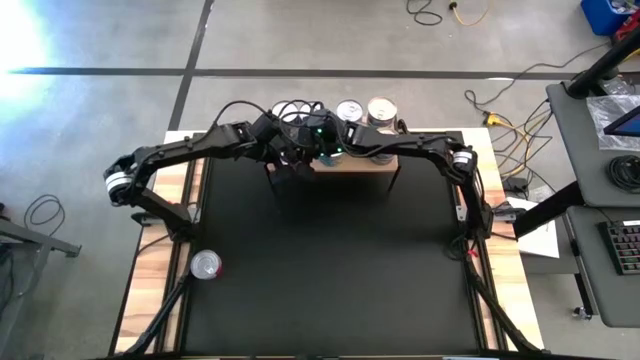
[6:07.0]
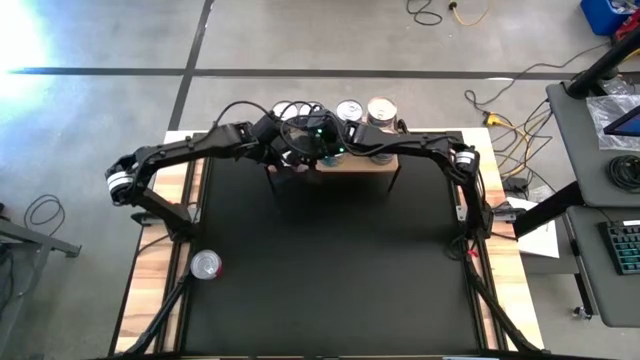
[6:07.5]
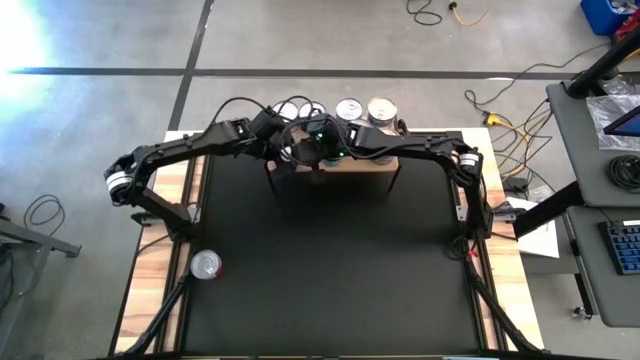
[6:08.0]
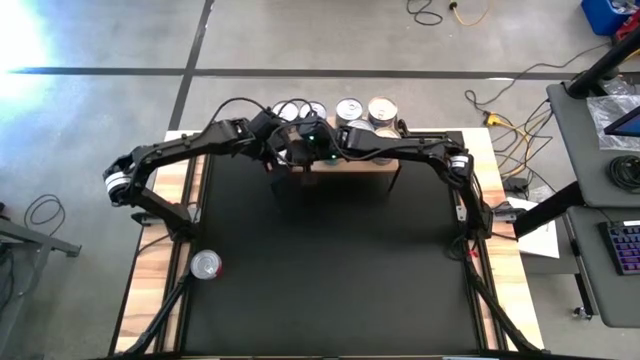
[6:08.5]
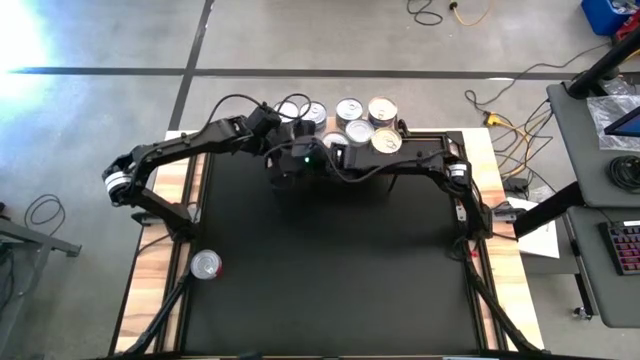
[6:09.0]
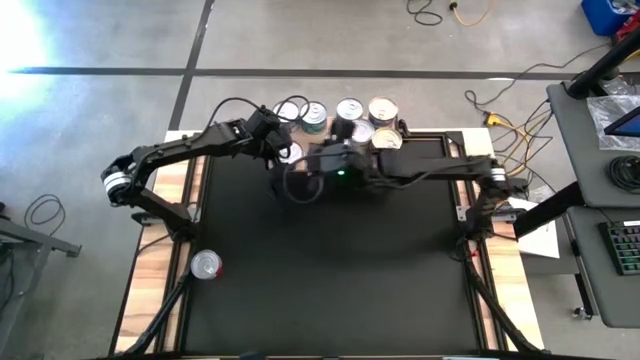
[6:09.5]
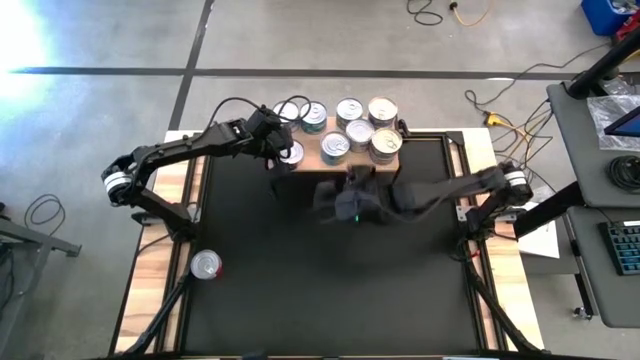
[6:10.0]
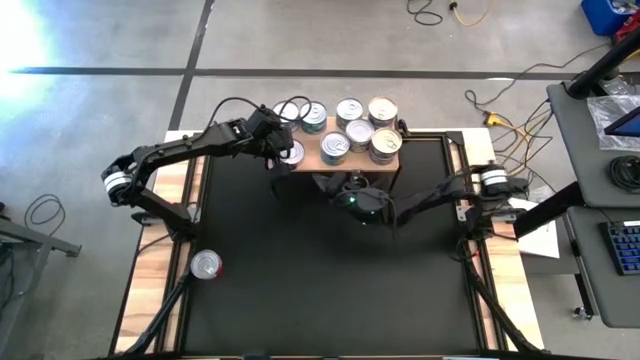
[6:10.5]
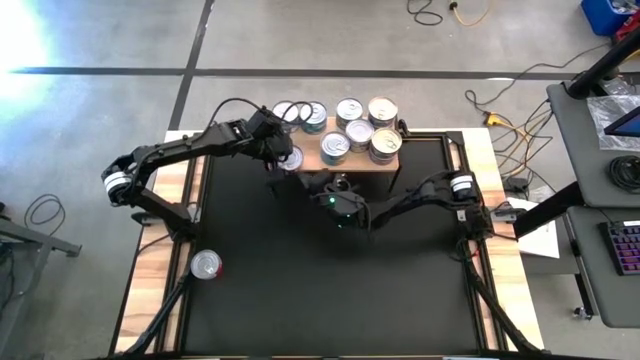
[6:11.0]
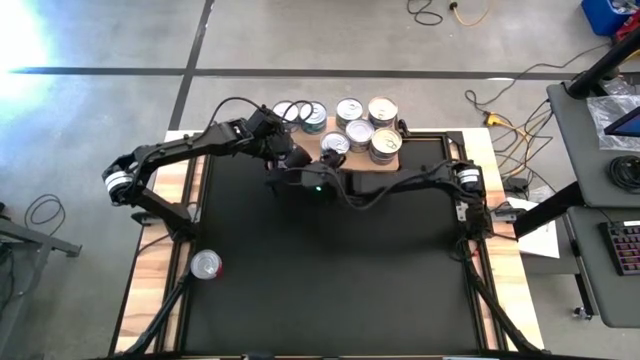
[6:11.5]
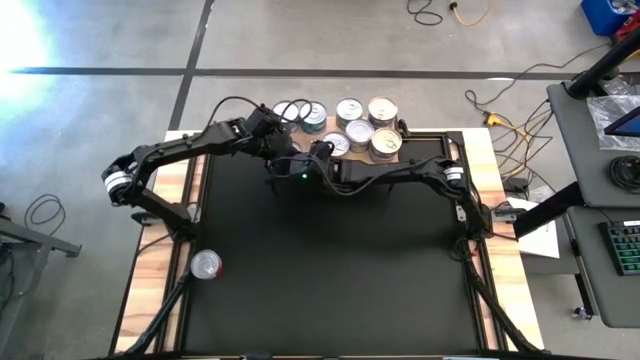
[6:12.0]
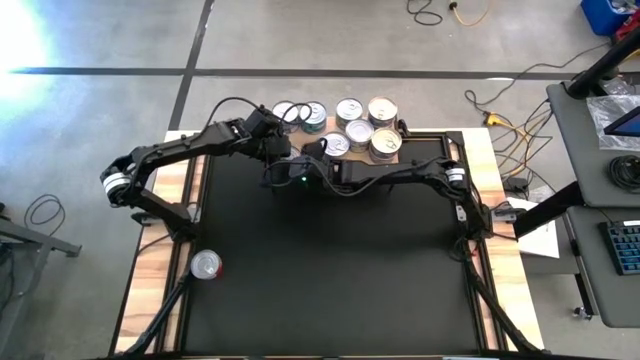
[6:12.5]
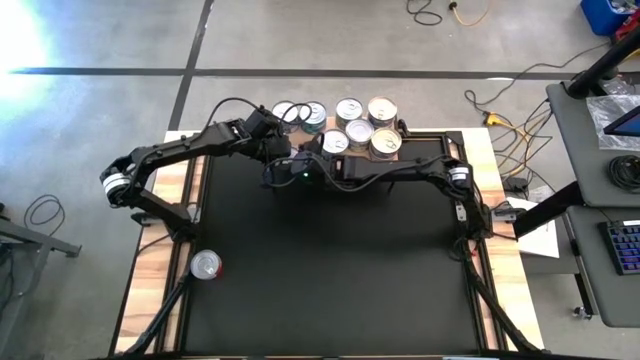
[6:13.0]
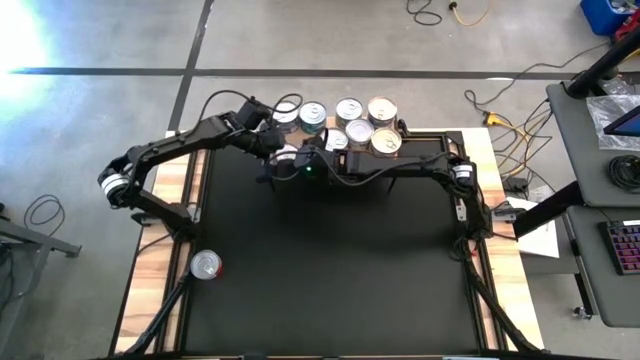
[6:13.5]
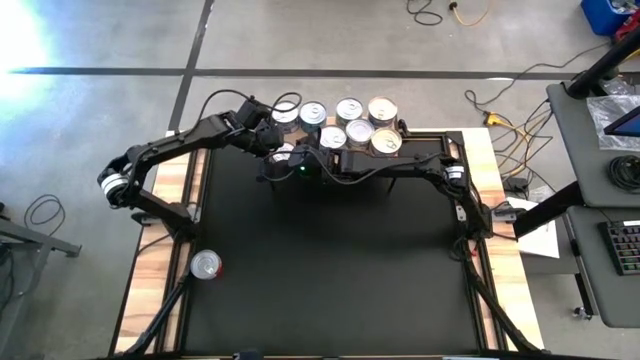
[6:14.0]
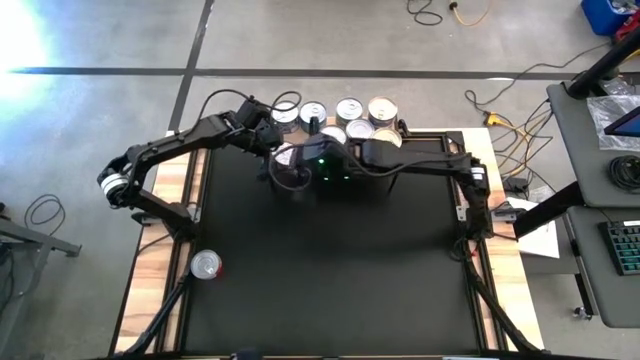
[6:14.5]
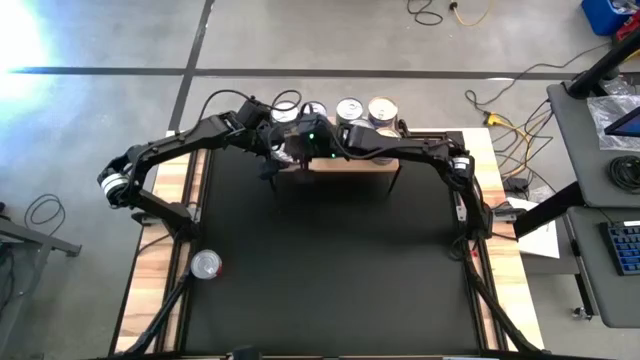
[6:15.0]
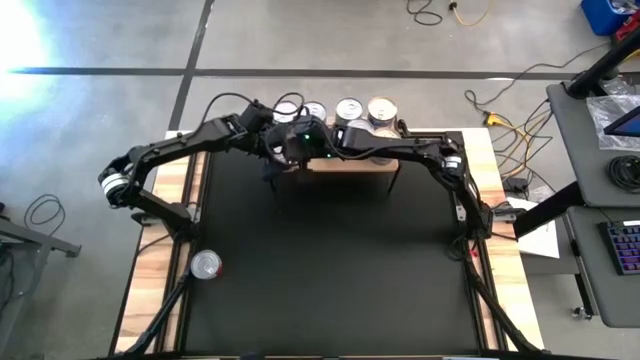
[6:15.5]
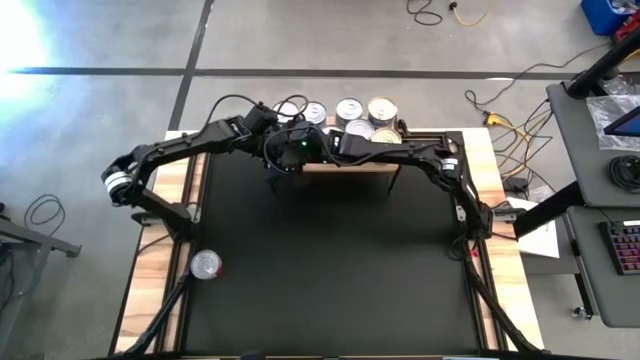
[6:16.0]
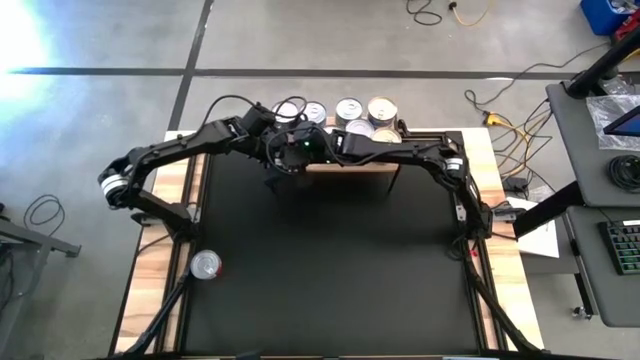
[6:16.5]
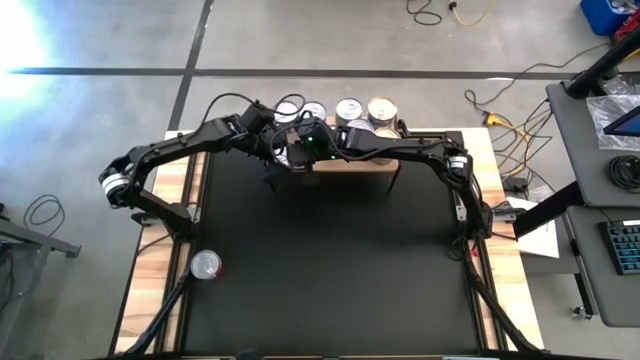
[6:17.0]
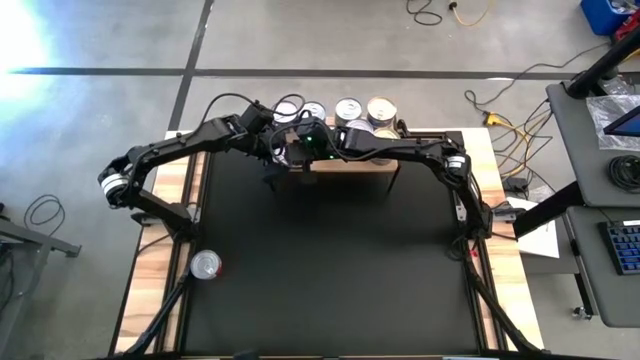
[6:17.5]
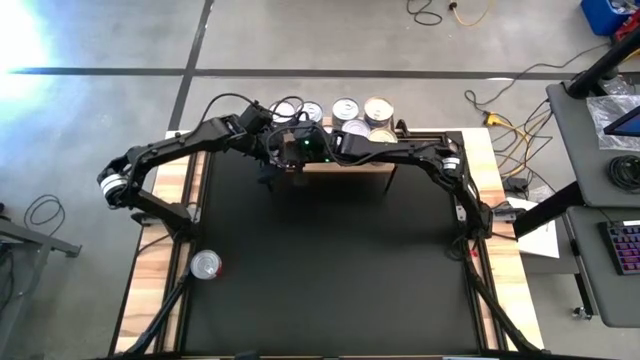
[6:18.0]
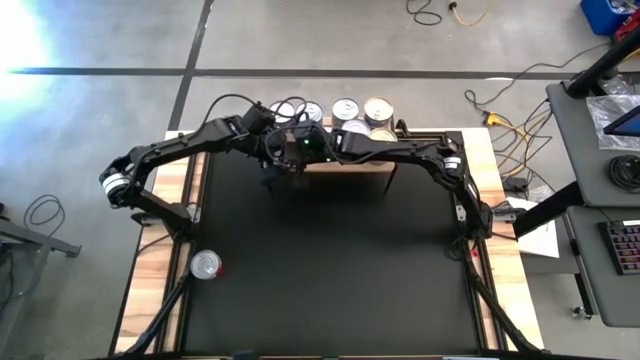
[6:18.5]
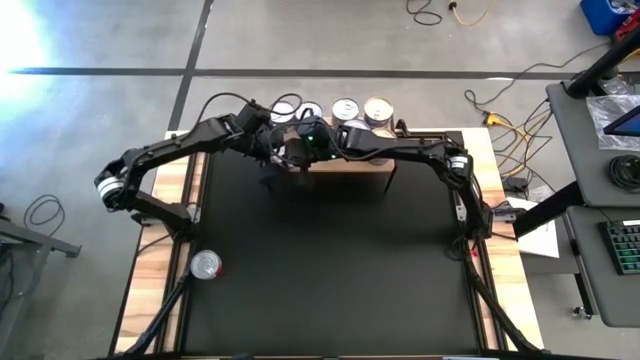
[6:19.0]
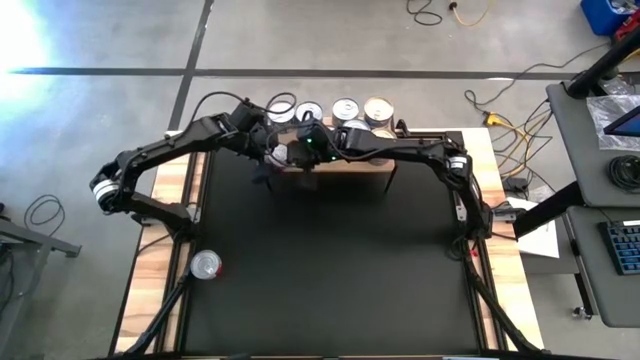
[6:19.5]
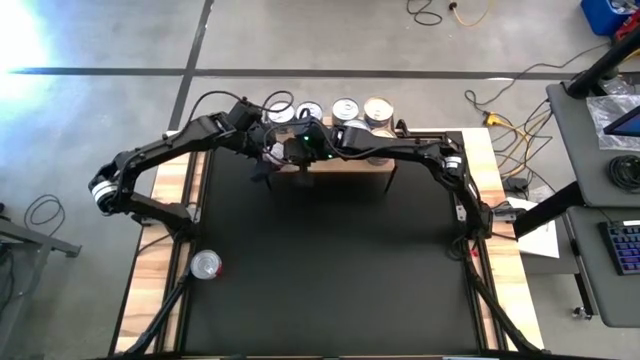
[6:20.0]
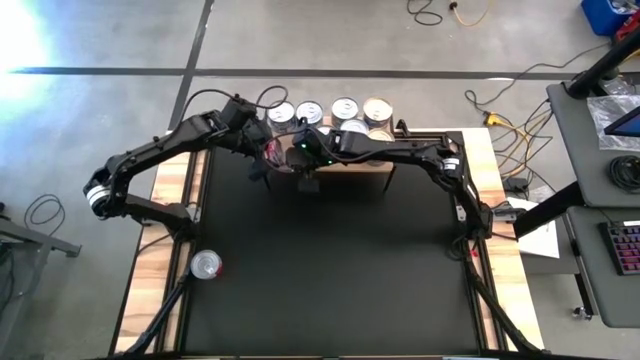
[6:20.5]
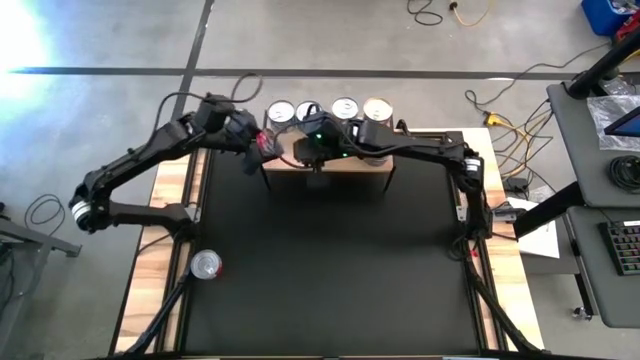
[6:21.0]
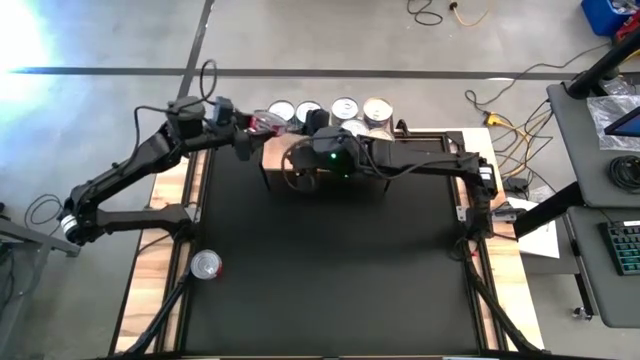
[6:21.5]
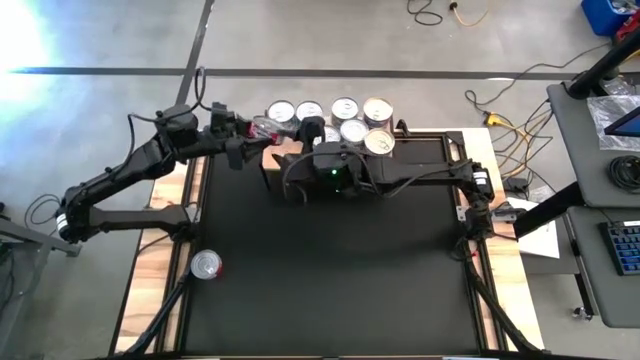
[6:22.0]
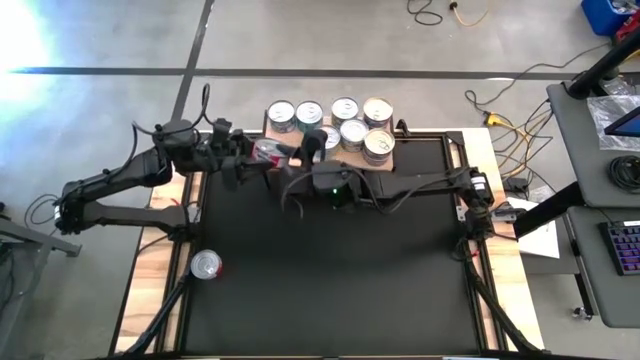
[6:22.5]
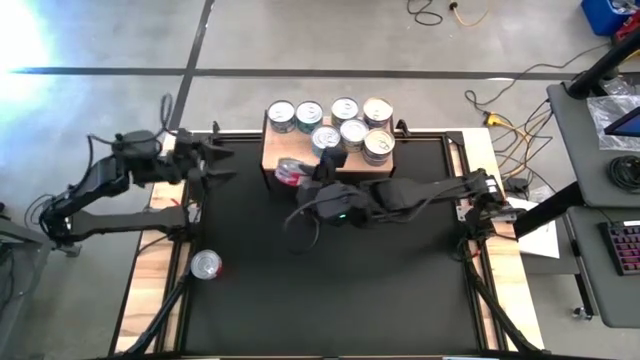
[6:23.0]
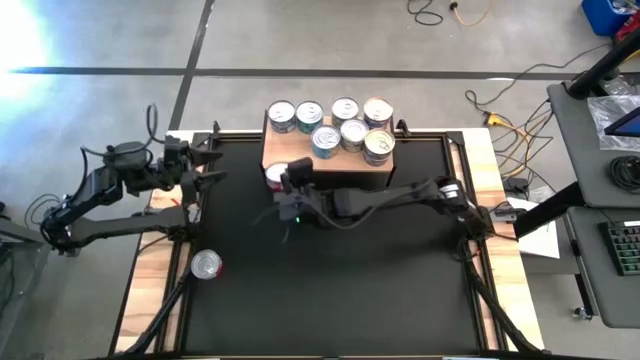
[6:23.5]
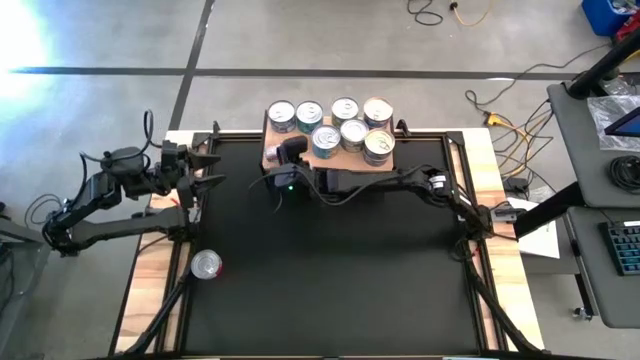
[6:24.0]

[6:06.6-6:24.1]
Task: Stack canned seafood by type on shelf
Put the top red tuna can on the shelf

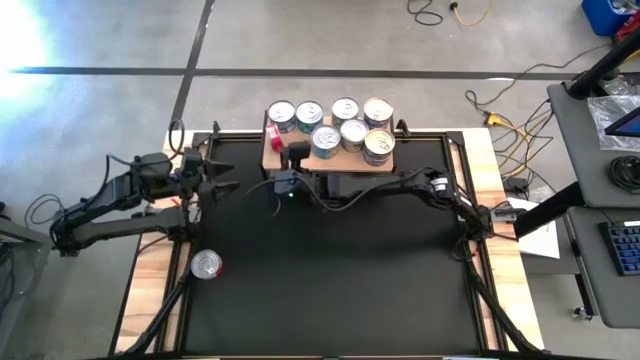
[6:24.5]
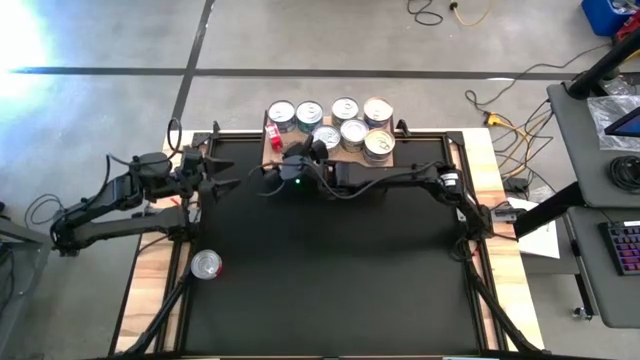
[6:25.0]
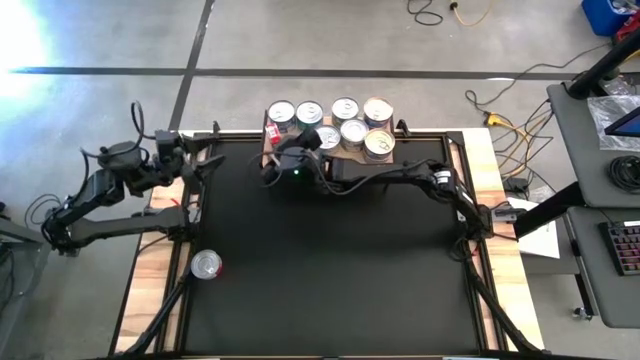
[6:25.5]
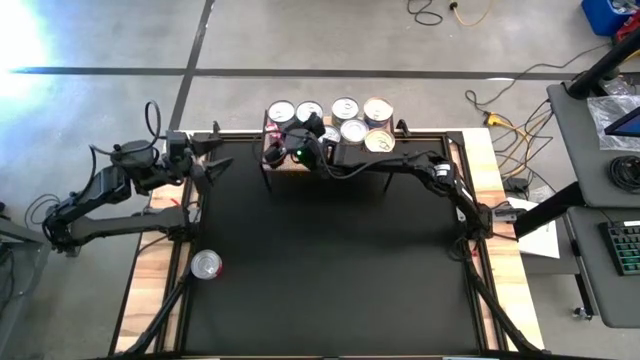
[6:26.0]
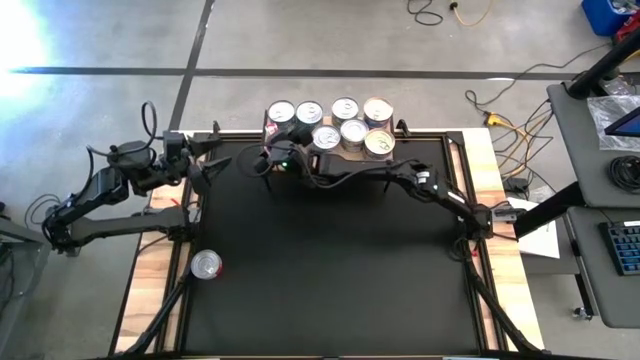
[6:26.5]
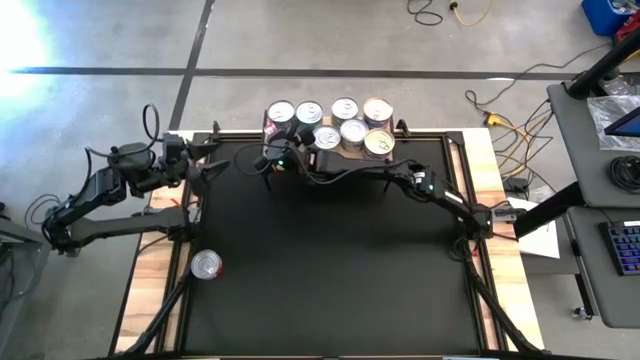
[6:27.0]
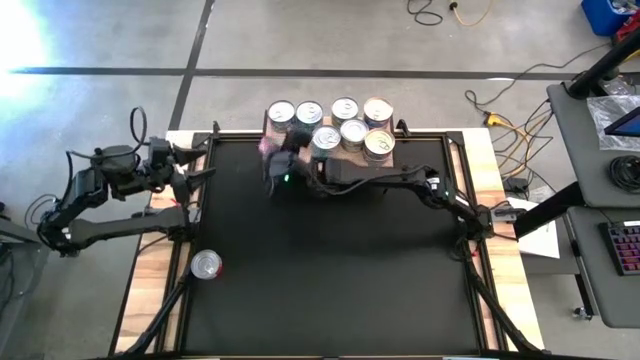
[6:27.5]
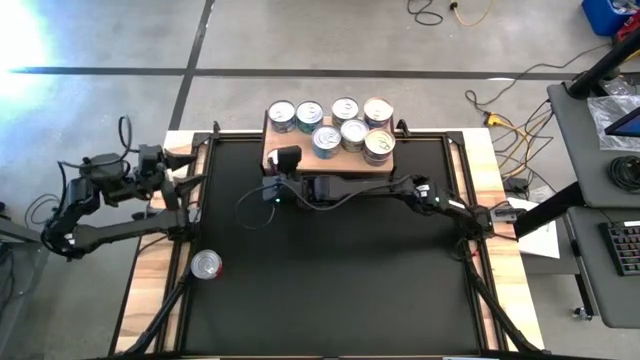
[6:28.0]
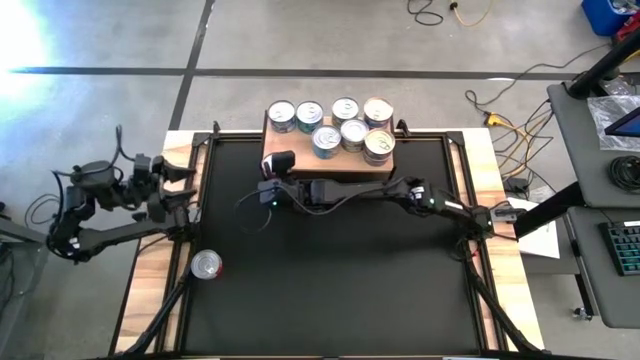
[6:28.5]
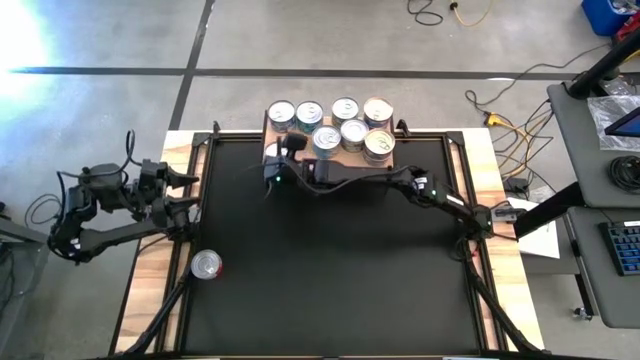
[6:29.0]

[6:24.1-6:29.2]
Put the top red tuna can on the shelf
